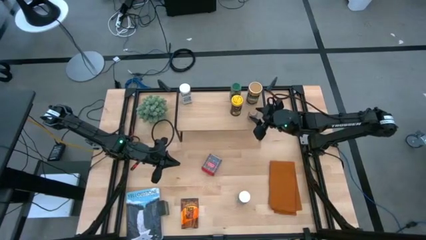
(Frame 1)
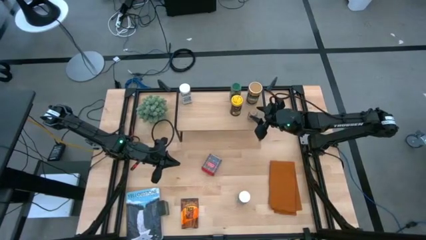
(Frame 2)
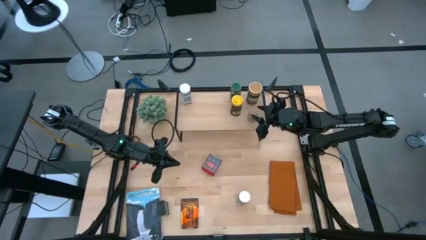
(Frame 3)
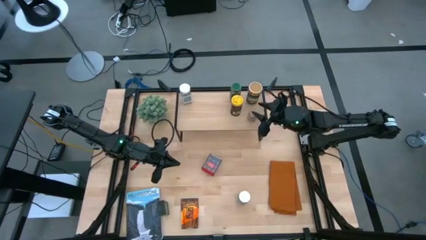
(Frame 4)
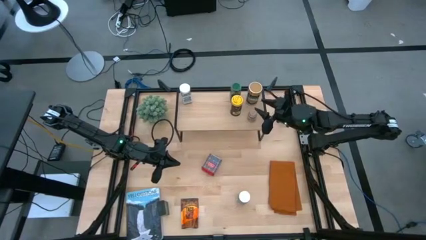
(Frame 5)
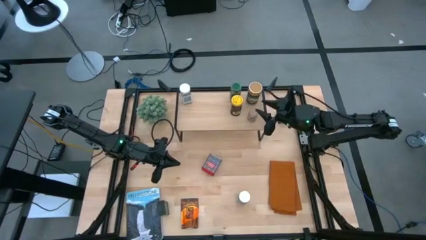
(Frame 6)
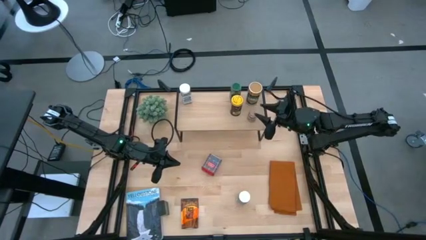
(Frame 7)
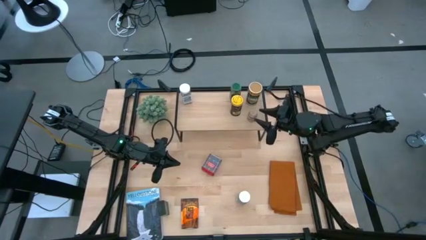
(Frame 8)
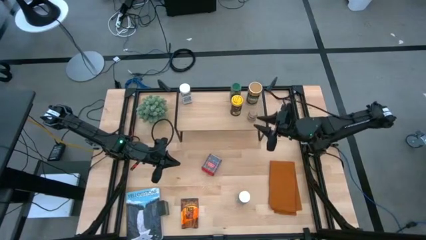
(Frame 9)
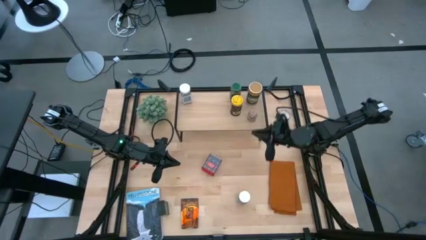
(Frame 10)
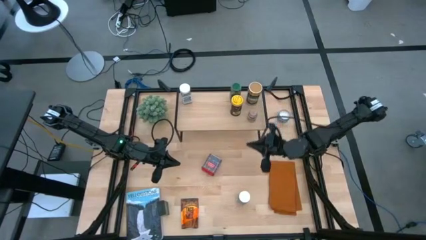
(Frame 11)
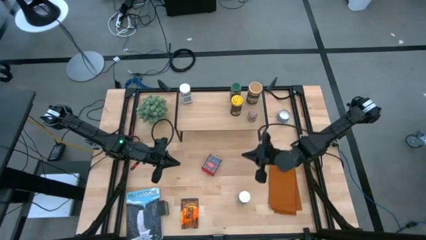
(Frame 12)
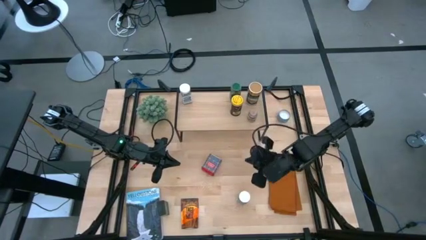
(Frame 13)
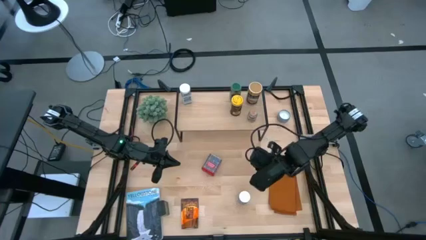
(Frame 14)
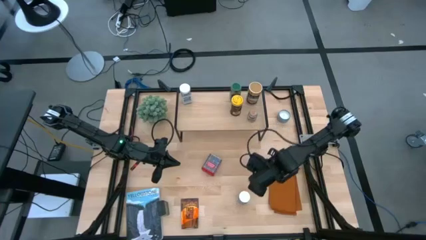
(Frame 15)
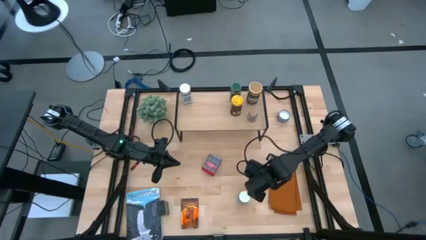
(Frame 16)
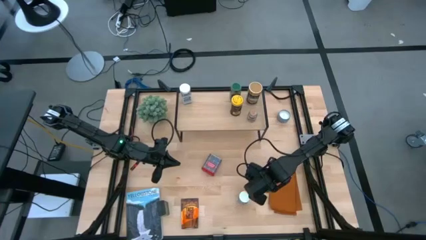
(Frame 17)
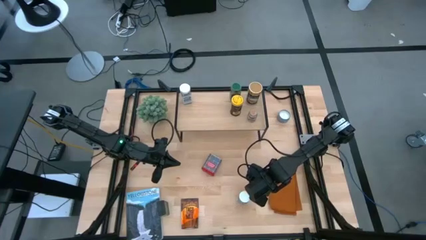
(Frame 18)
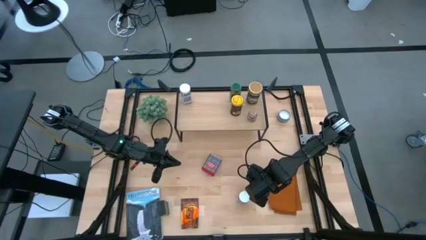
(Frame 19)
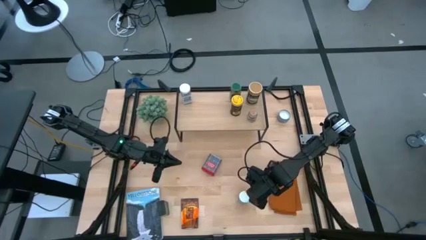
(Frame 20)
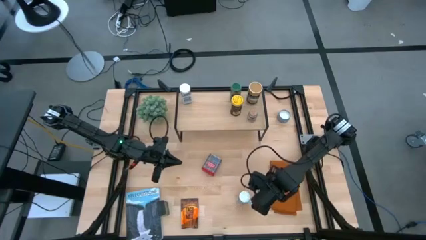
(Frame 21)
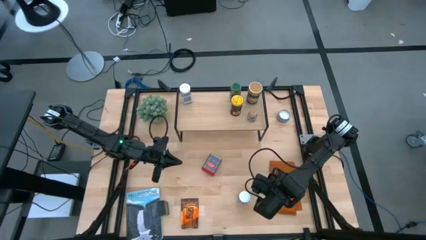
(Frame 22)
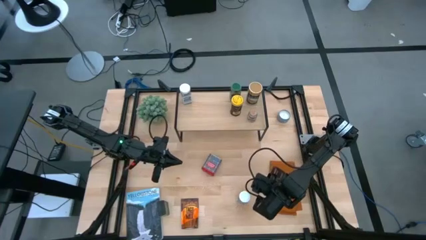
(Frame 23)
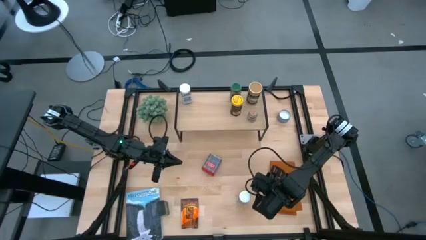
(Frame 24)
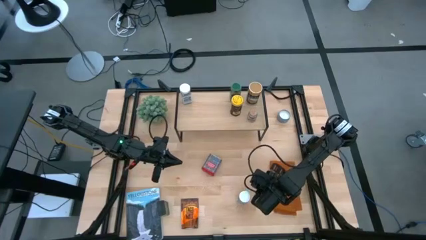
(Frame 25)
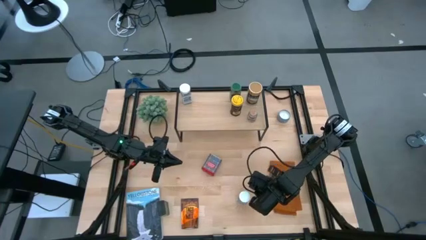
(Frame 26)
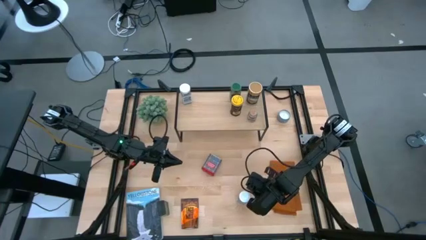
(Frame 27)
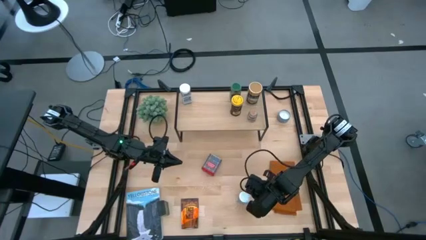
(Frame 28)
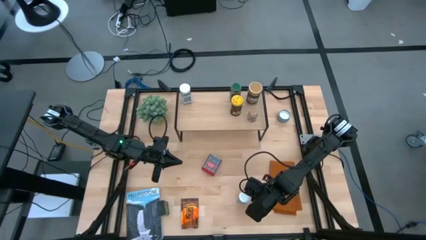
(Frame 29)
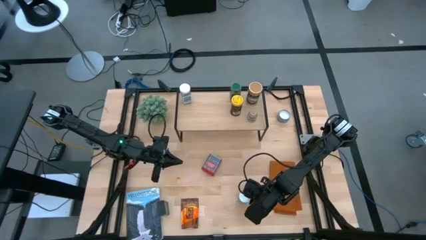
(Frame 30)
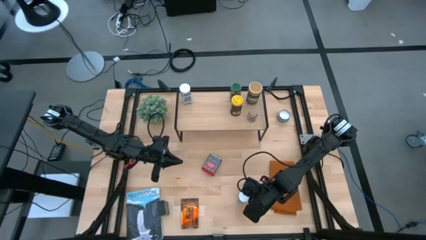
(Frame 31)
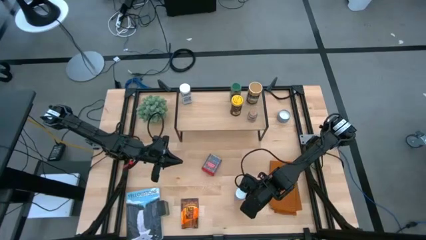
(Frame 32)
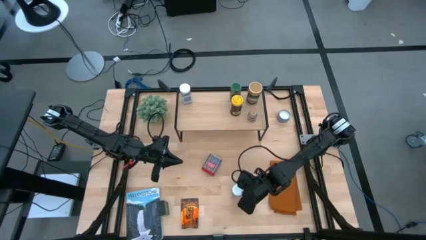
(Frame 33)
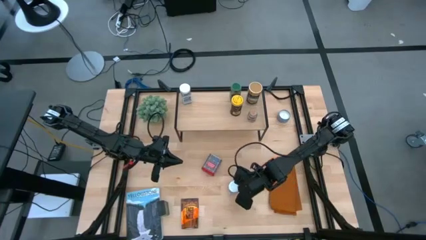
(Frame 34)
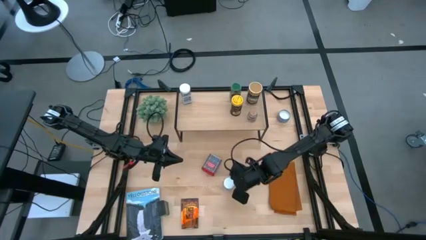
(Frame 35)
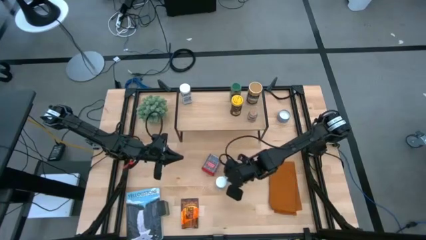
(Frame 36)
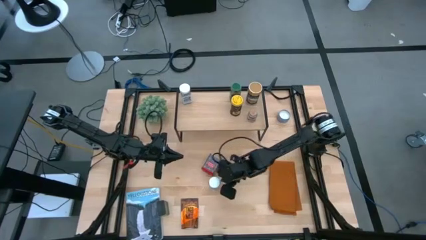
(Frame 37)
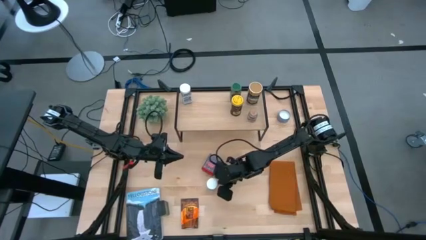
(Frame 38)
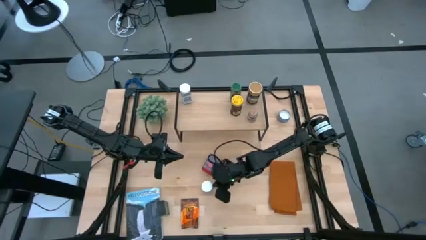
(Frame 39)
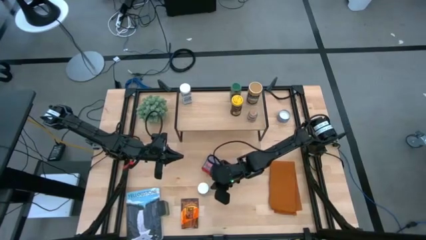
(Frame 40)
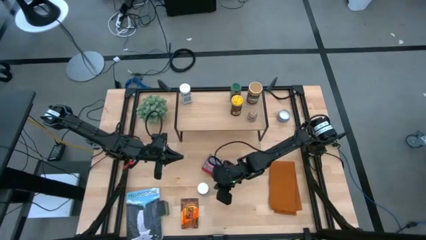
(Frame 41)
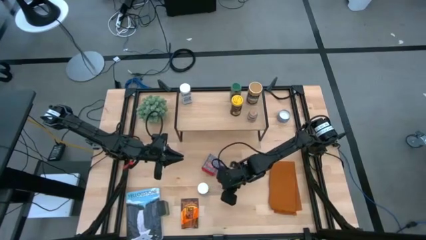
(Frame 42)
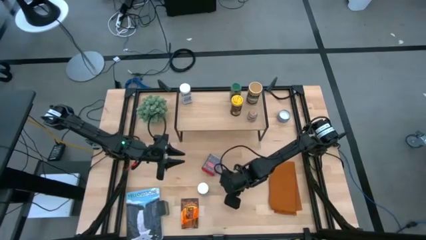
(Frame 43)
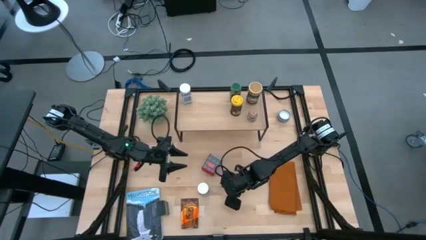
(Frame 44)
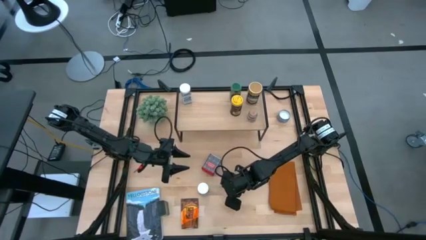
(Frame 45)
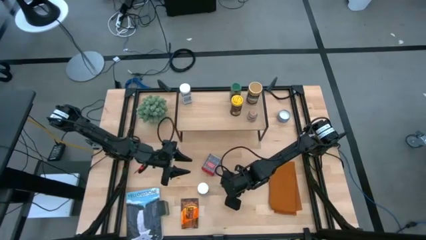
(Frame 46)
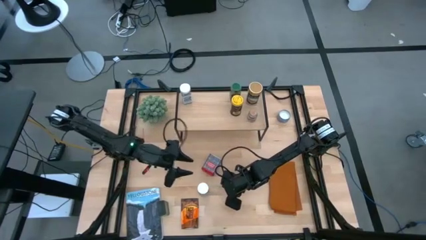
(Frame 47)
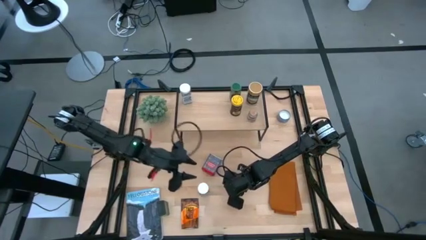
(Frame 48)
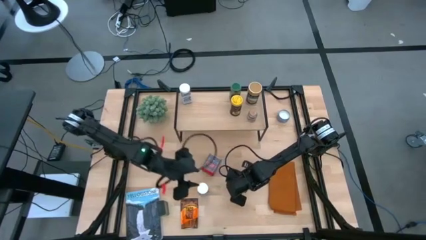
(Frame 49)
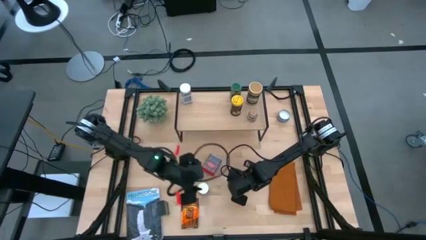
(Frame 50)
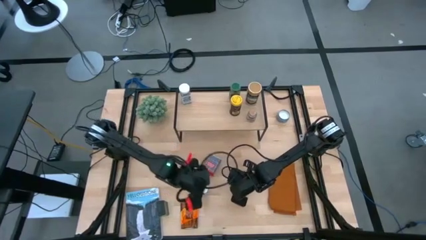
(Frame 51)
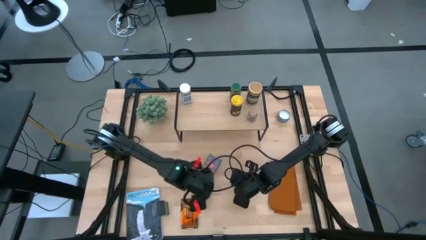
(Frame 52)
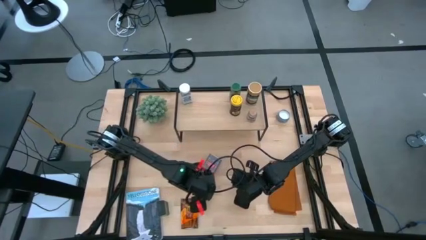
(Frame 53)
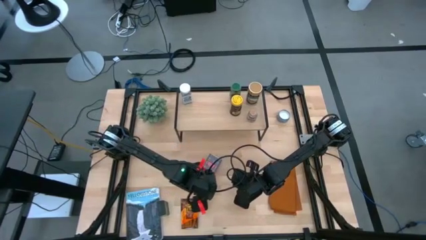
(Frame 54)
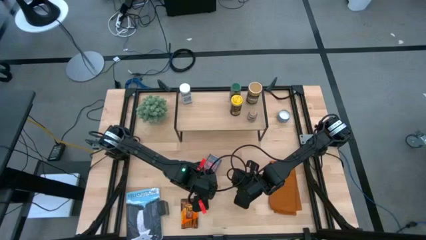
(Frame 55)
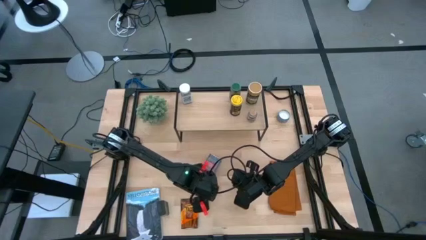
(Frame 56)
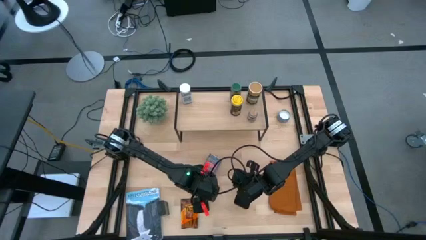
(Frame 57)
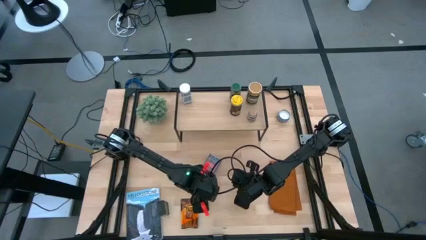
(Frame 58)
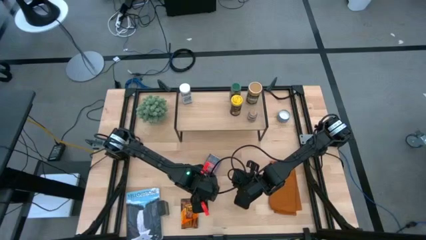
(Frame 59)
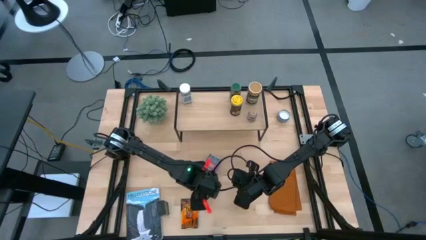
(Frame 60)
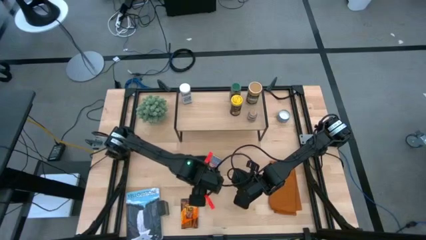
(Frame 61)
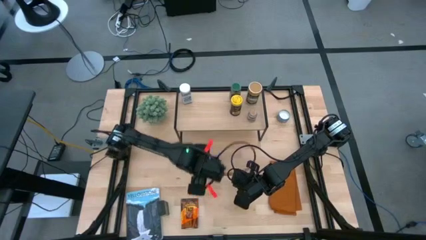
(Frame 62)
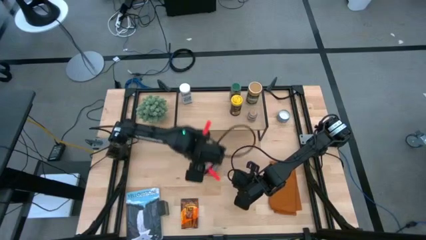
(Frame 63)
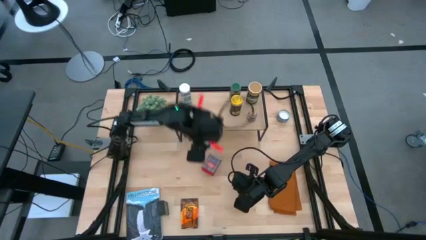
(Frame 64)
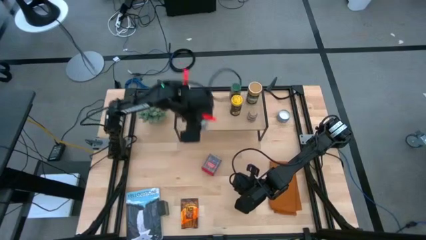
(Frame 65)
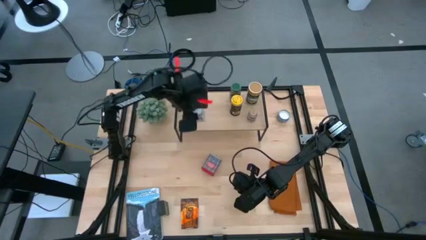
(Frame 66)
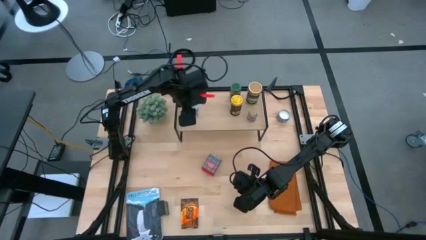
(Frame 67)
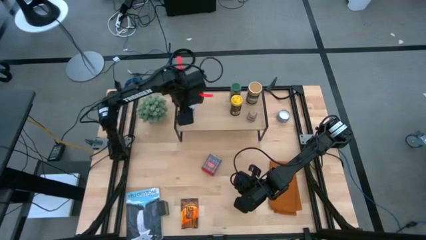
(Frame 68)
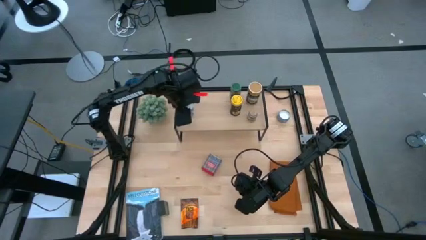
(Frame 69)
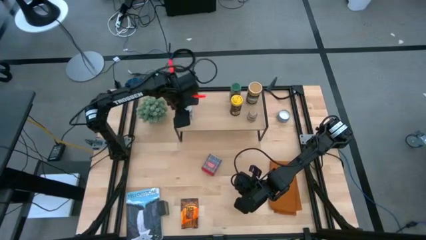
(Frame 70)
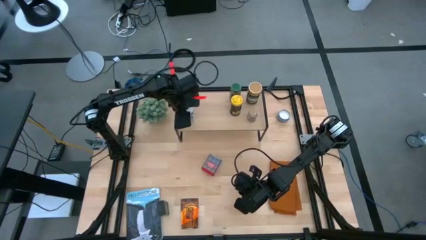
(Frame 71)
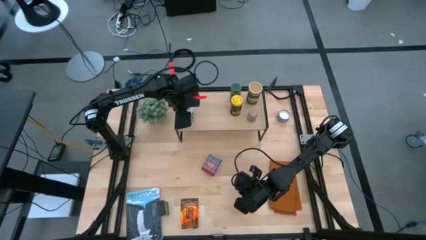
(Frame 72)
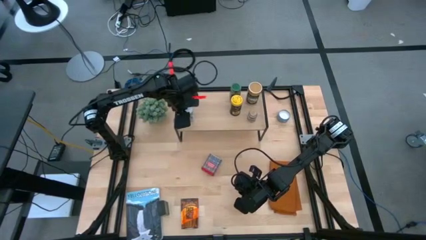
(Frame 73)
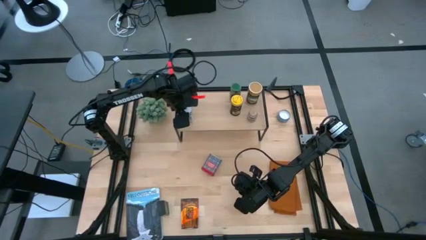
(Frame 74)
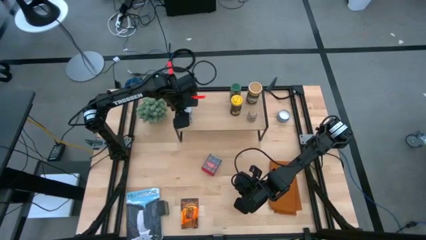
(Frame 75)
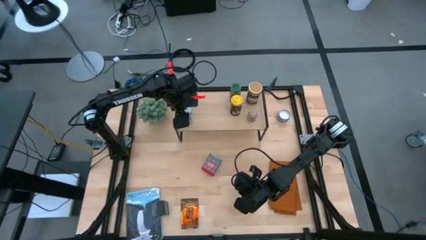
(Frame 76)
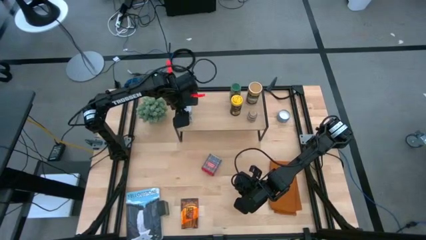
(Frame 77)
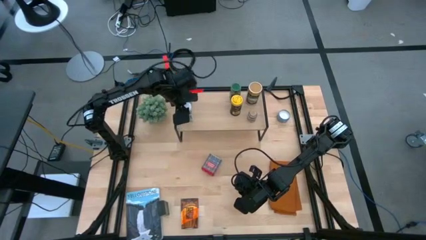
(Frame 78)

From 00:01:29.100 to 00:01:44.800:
Task: Shelf spices
Put the white seasoning bottle onto the shelf
